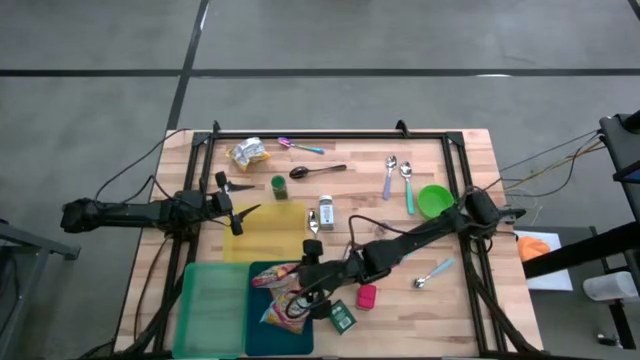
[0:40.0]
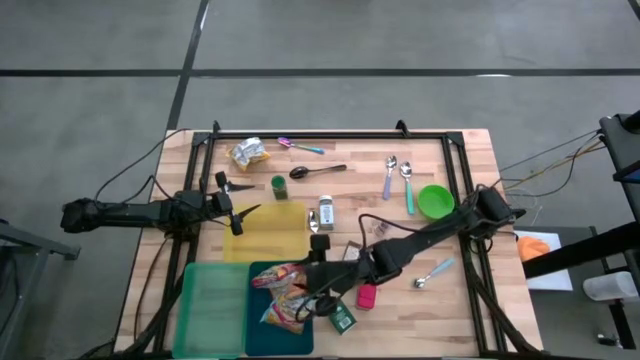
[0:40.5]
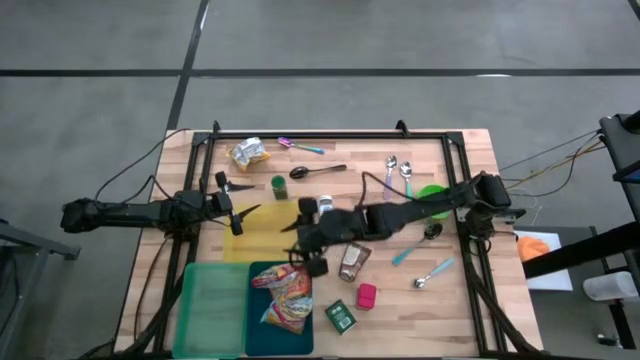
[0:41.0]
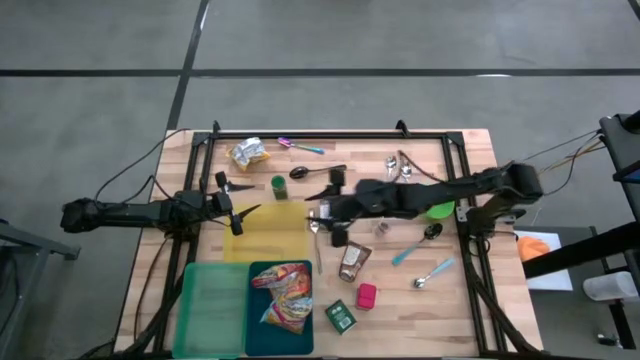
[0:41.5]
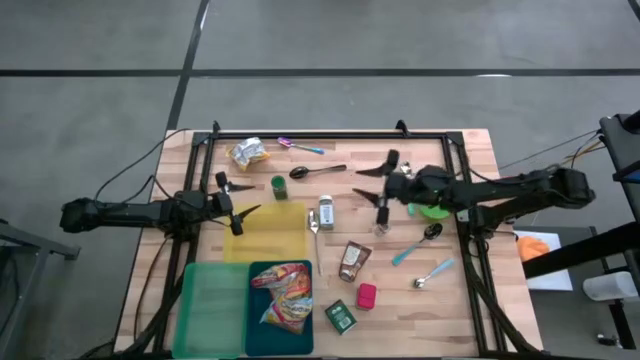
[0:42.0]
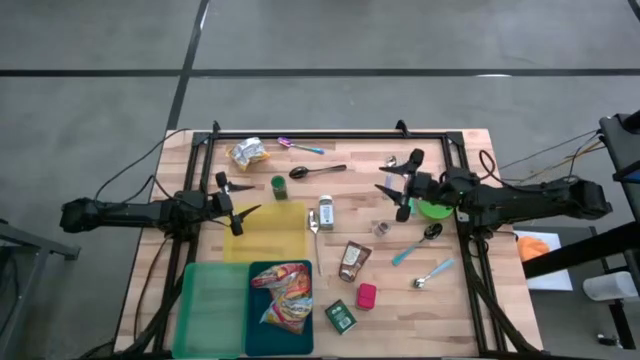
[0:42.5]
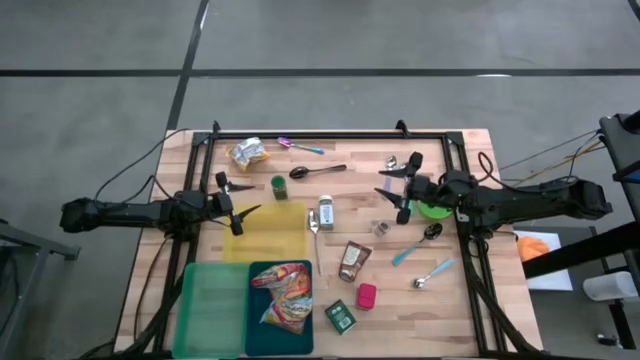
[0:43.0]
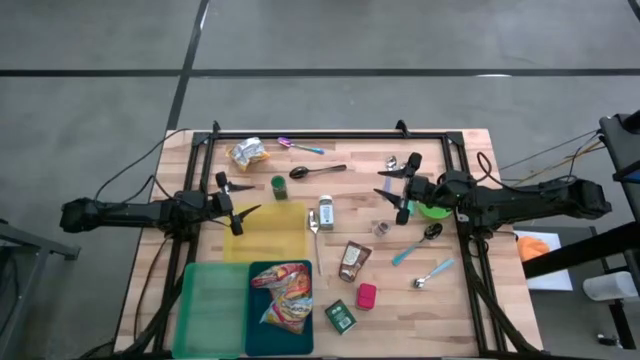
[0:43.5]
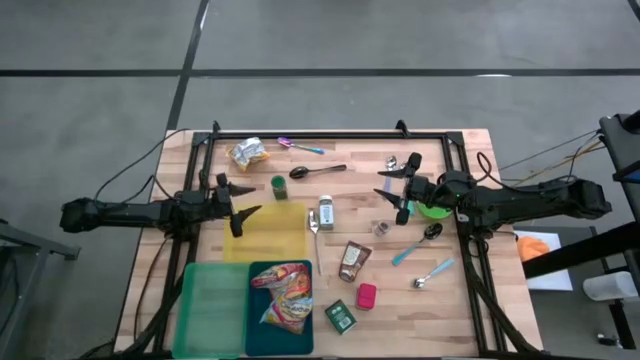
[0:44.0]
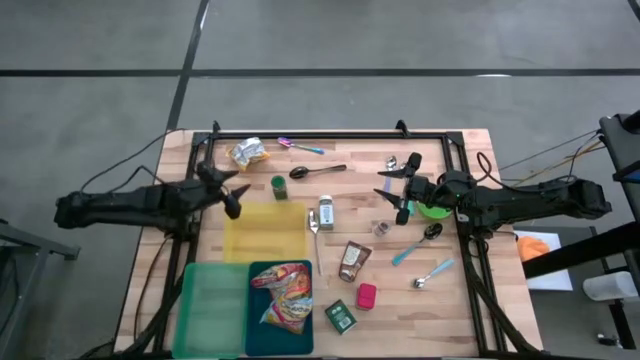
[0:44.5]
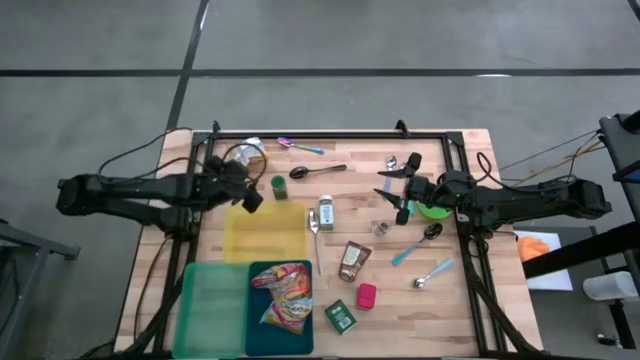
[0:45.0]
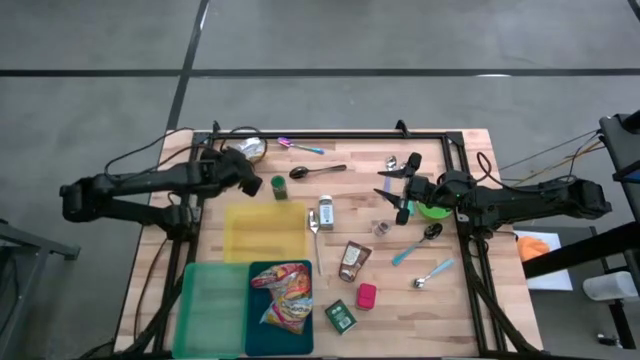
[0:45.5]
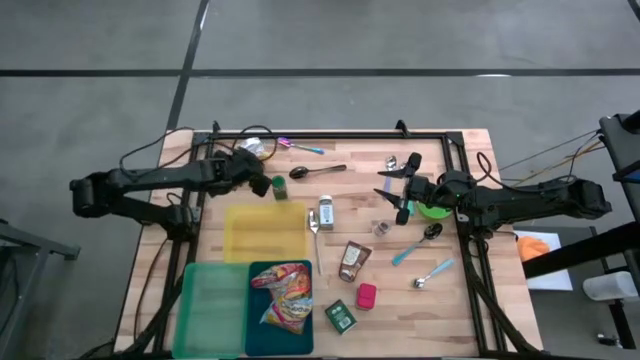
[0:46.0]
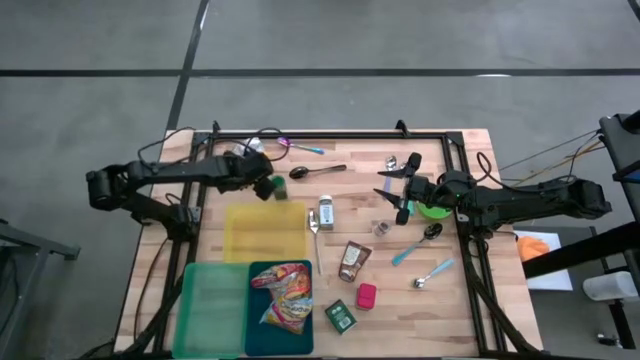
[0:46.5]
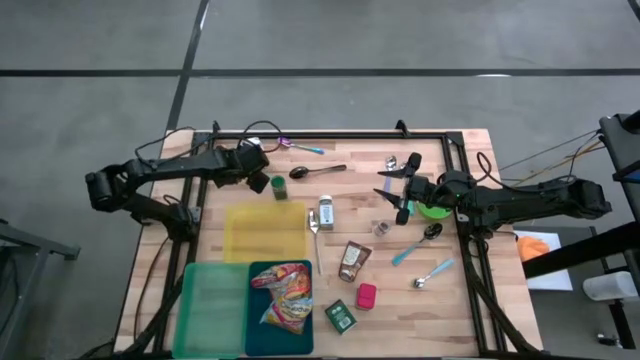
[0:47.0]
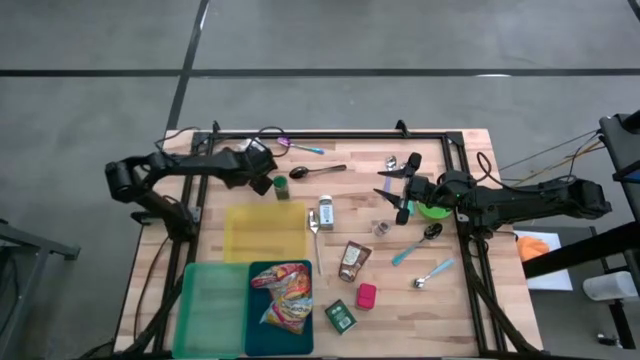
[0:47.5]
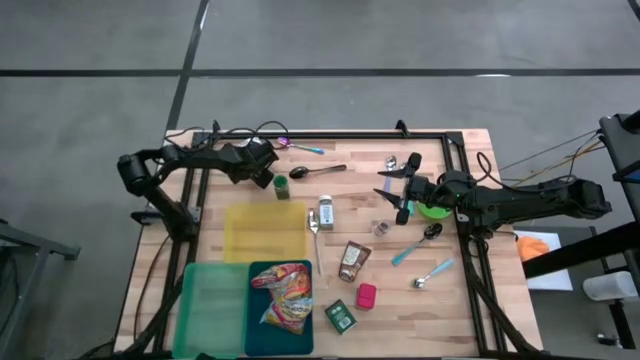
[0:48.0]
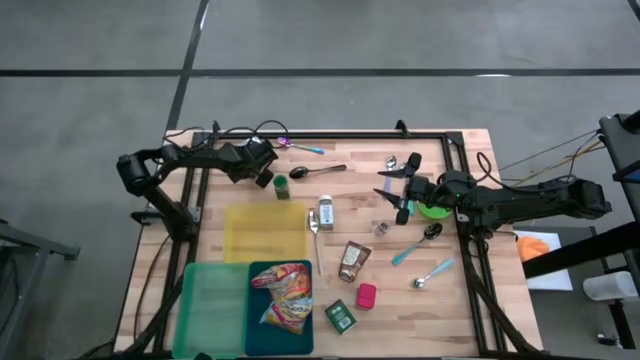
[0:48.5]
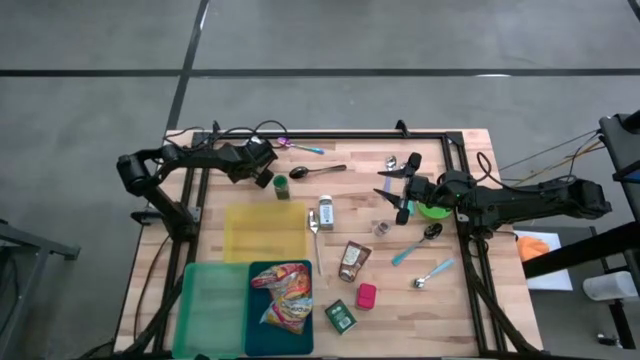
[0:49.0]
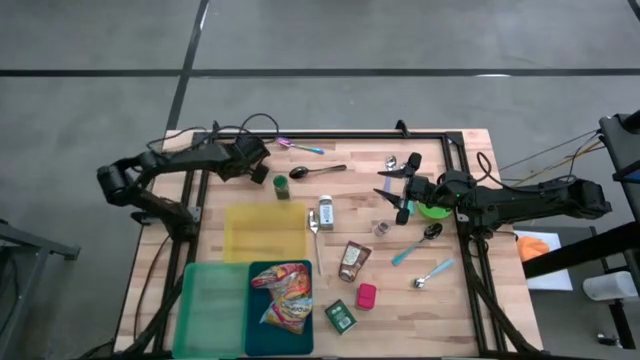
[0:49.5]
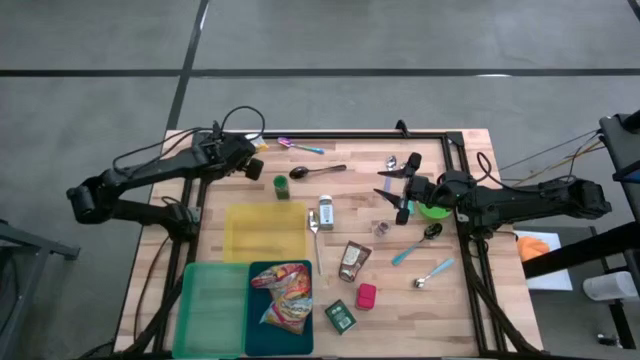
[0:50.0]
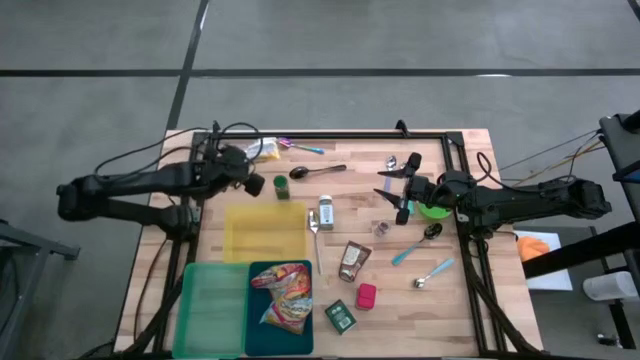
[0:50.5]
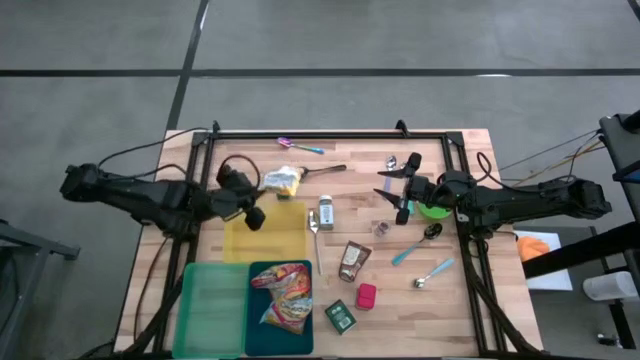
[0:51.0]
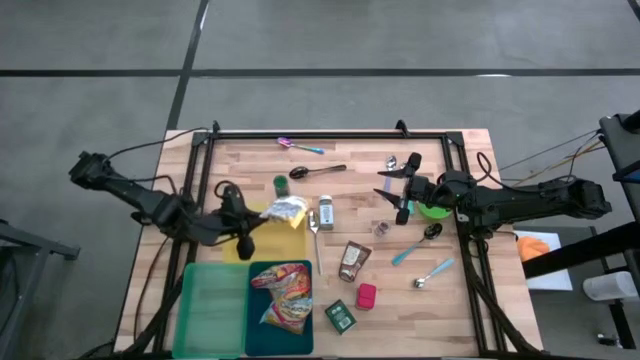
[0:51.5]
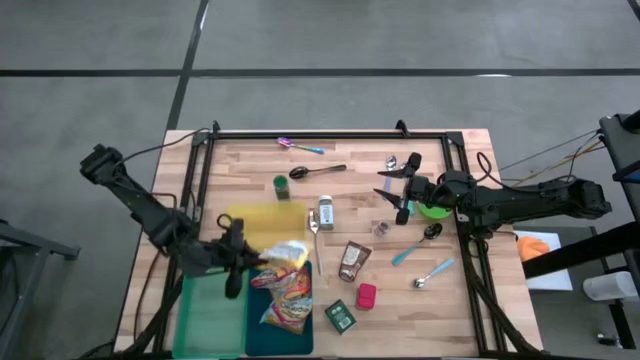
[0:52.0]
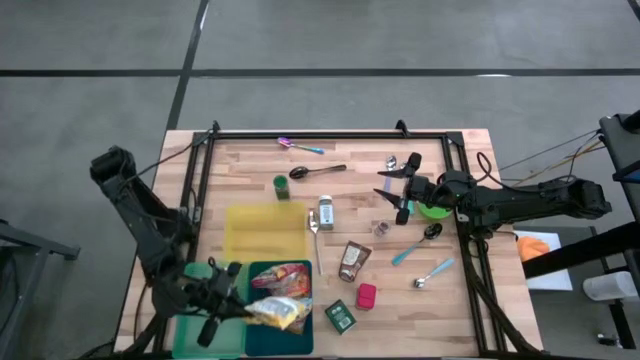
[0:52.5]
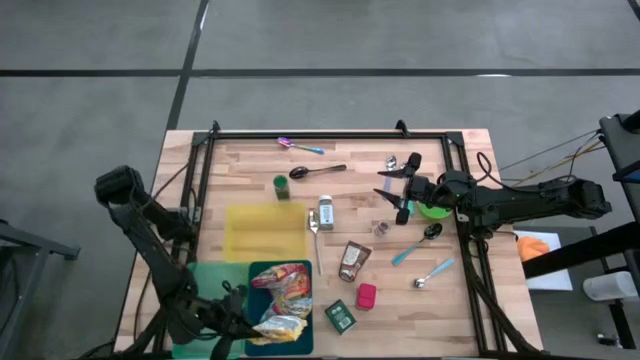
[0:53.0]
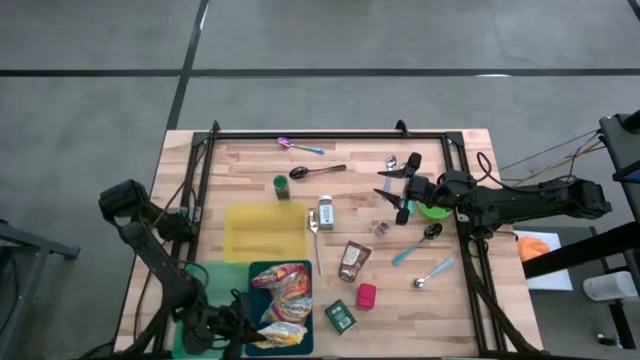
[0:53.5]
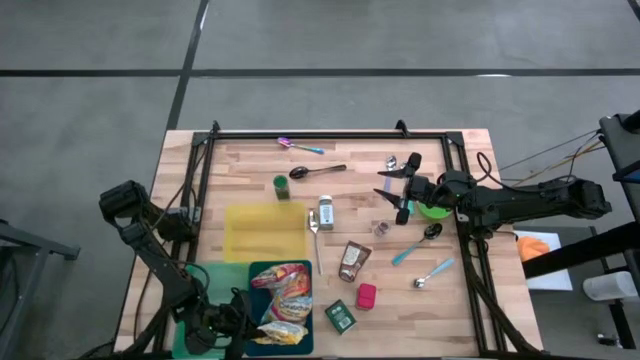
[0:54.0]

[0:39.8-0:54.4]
Put the yellow noodle pack into the blue bin

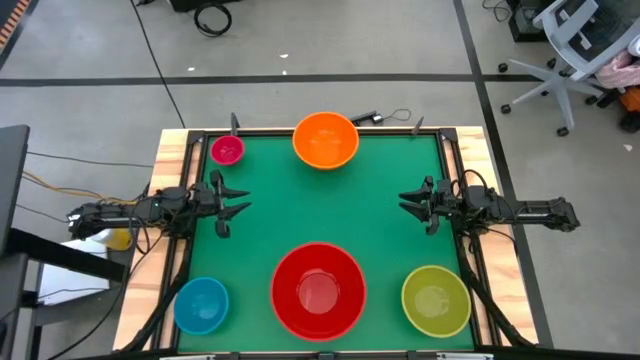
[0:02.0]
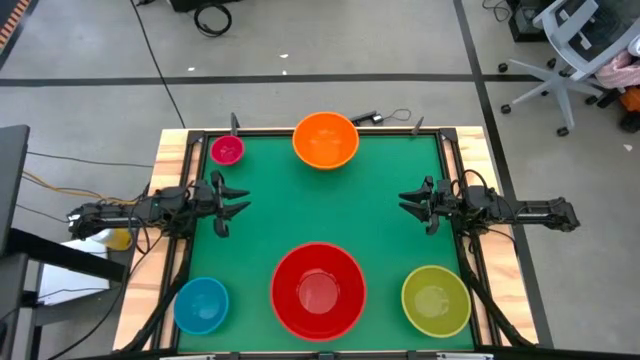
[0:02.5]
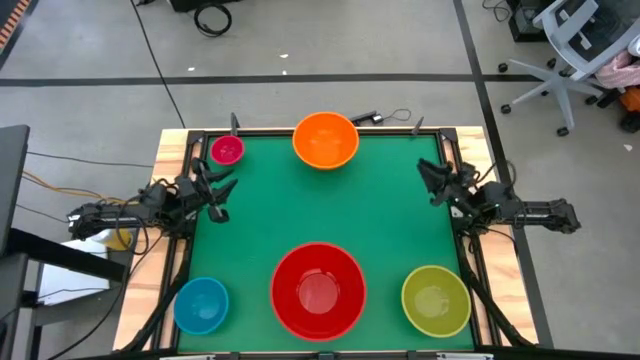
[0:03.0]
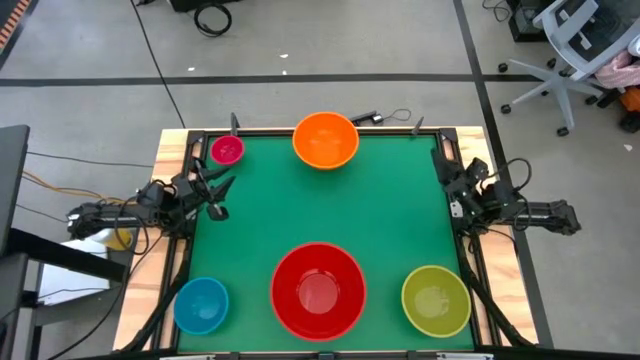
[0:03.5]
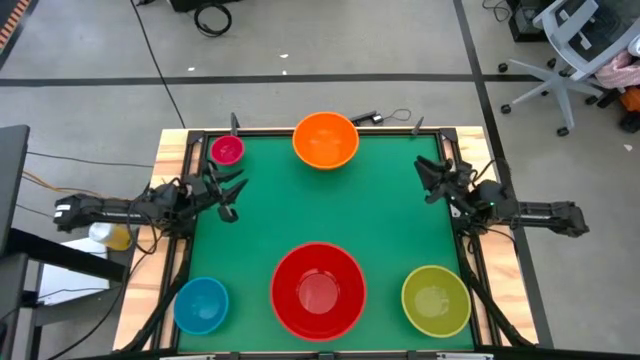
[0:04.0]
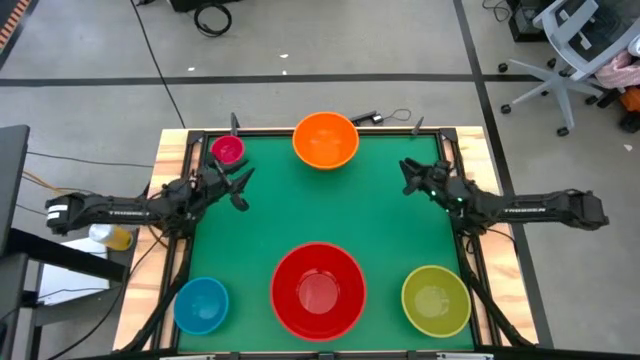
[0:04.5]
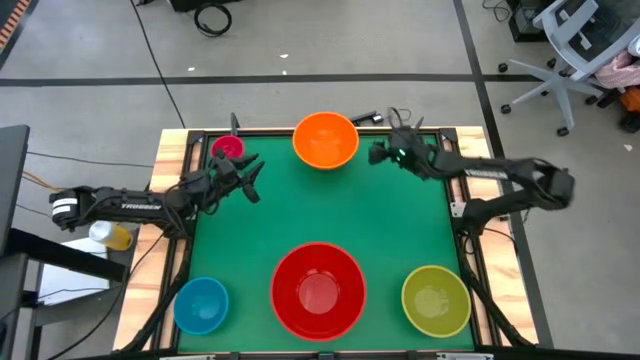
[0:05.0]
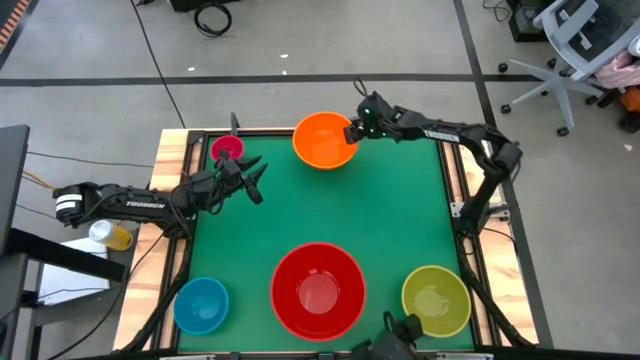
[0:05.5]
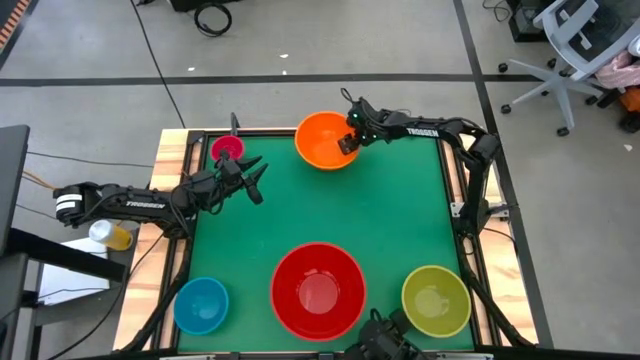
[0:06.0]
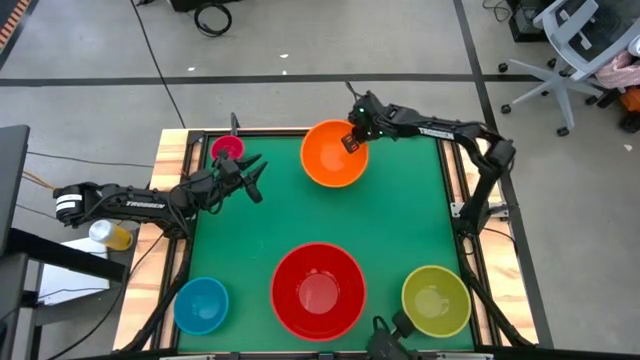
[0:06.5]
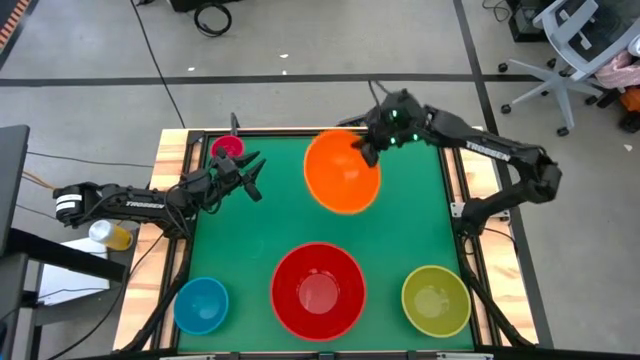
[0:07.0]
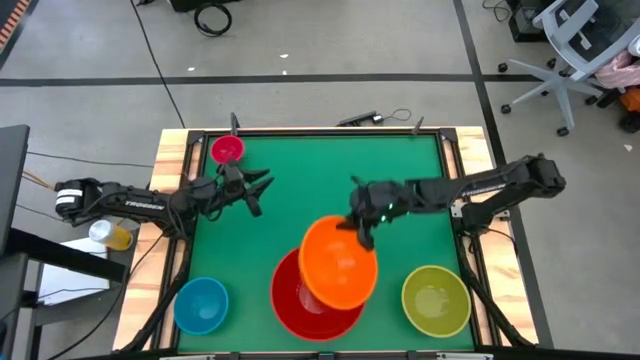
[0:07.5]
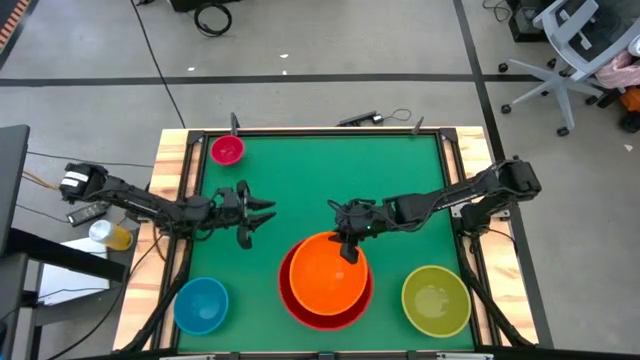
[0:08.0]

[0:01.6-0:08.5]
Stack the orange bowl into the big red bowl

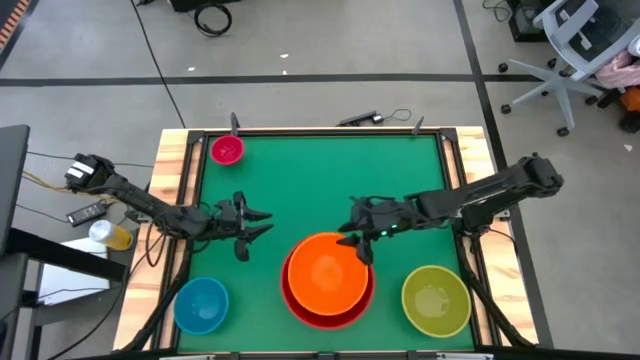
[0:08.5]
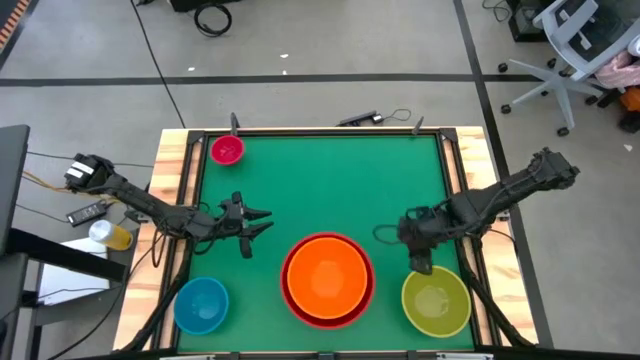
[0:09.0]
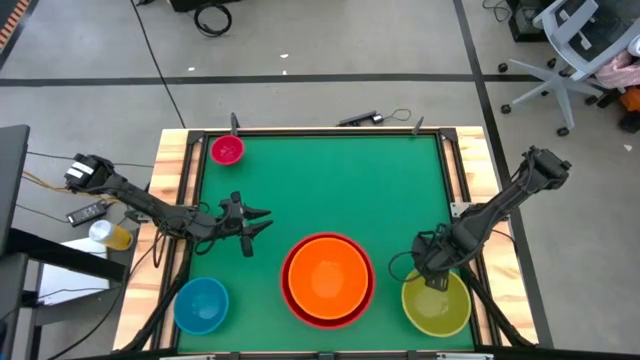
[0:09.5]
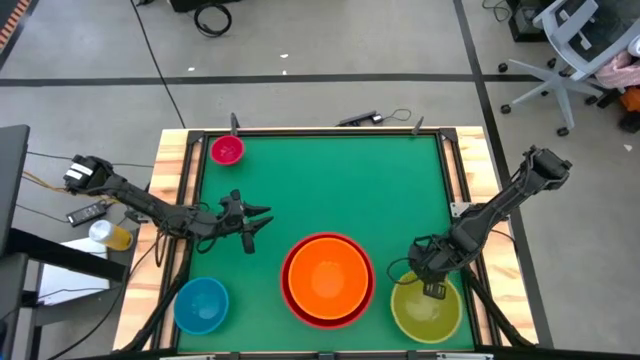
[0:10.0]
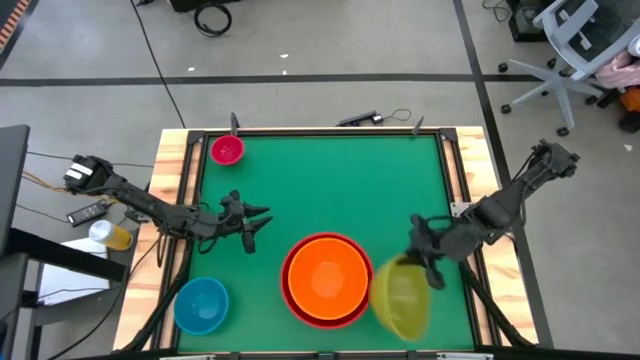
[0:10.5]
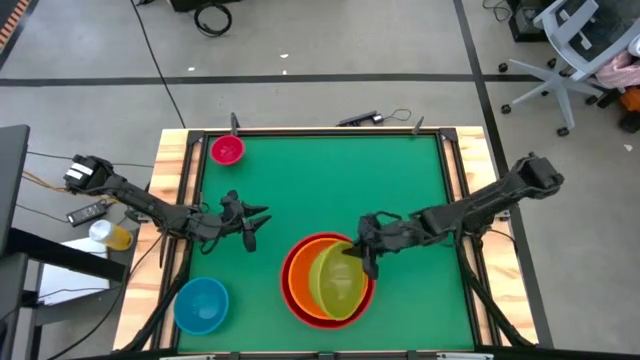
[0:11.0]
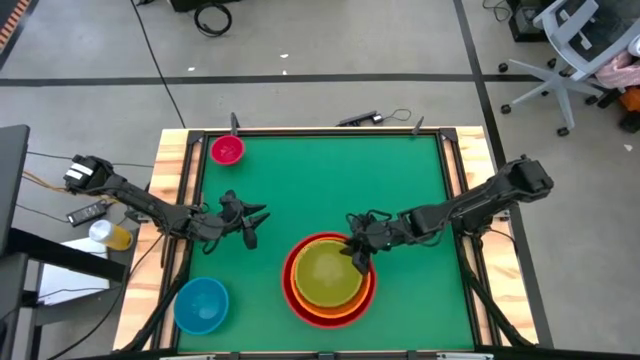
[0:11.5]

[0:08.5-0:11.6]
Stack the green bowl into the orange bowl
